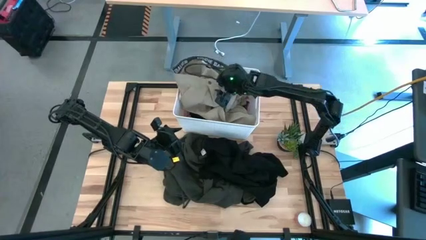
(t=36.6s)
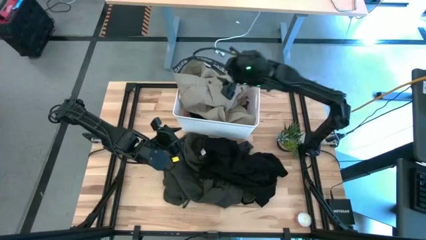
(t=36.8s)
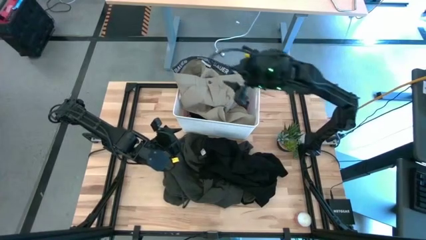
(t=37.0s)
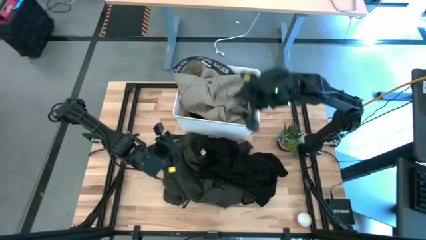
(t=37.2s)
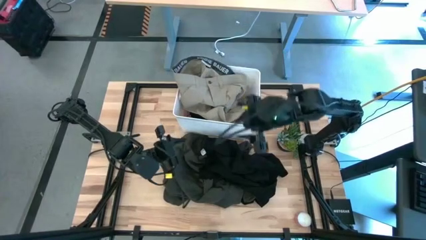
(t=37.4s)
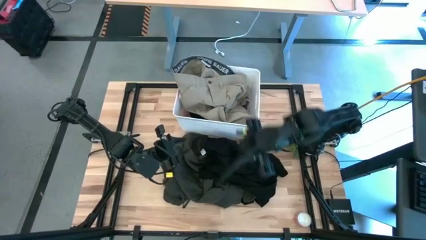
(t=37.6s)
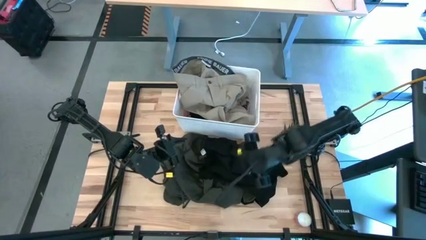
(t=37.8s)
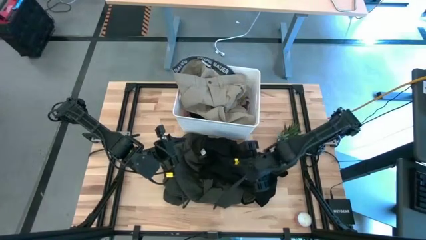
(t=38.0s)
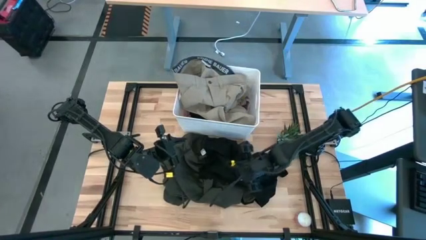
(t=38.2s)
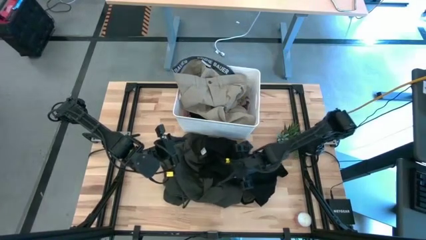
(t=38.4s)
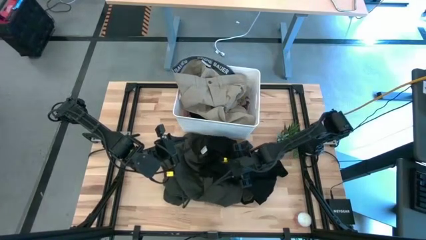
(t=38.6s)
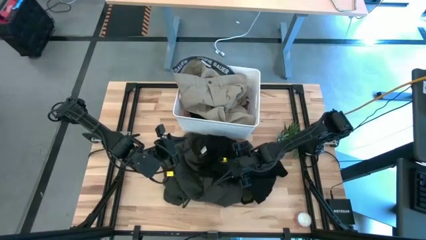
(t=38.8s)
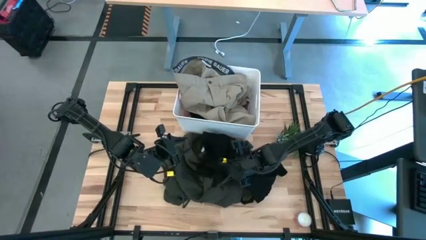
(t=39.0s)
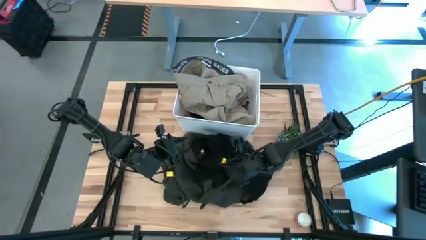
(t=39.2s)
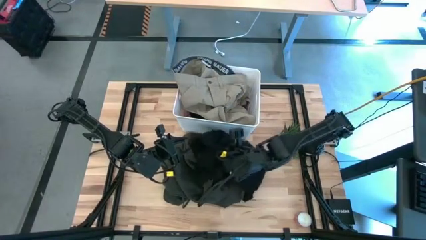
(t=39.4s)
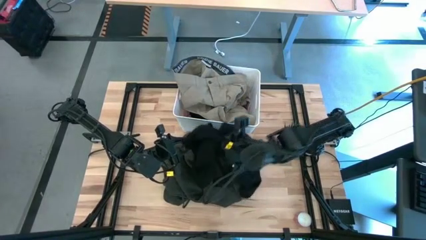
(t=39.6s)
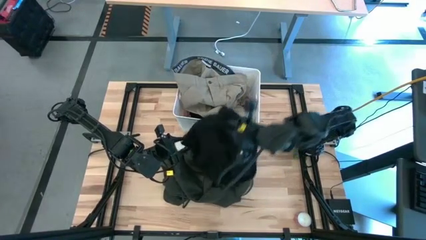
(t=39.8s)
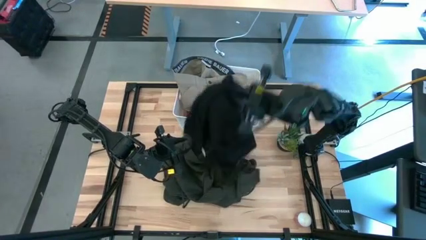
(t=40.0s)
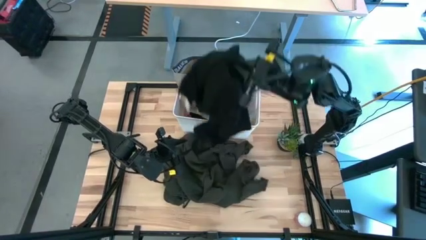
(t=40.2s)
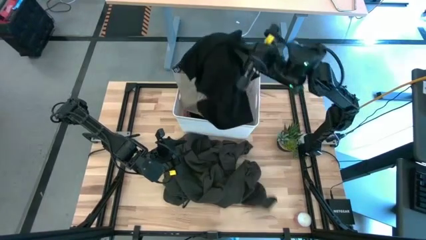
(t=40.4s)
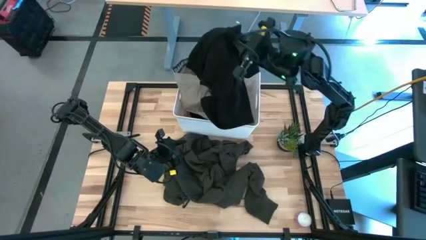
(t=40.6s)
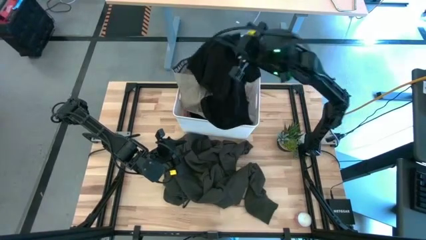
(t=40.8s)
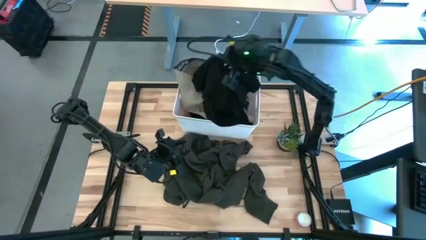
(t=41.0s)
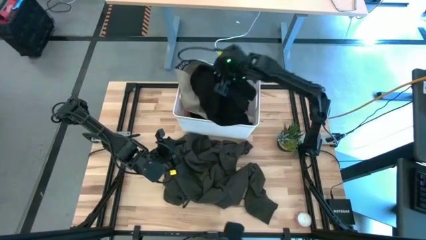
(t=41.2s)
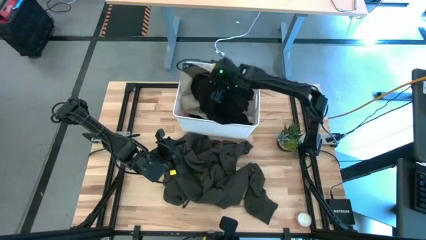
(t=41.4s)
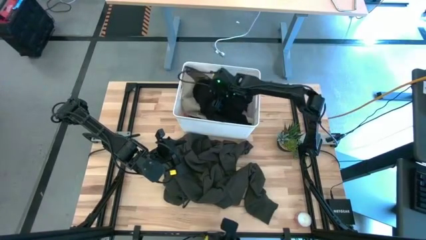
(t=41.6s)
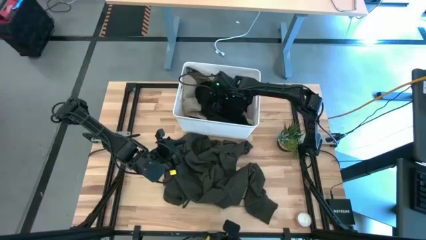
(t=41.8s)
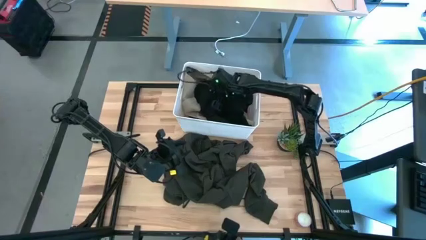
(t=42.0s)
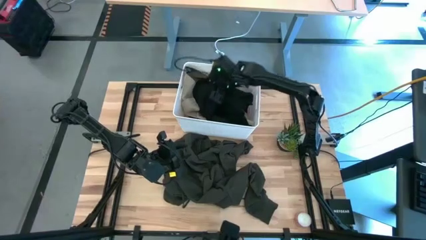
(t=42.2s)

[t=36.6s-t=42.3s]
Task: Sort clothes
Put the black shirt into the white laundry laundry bin

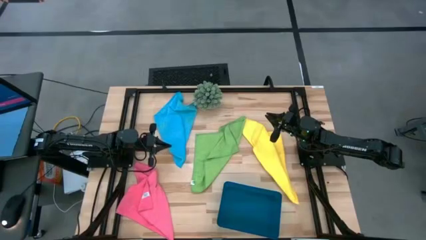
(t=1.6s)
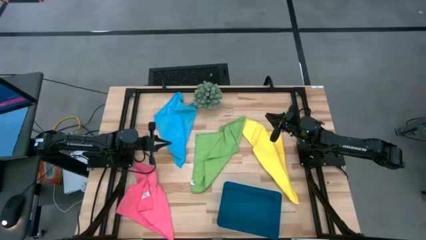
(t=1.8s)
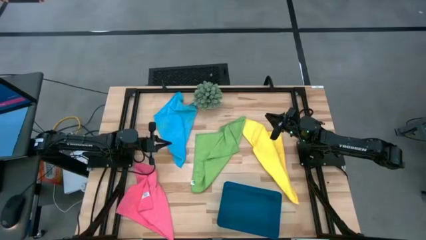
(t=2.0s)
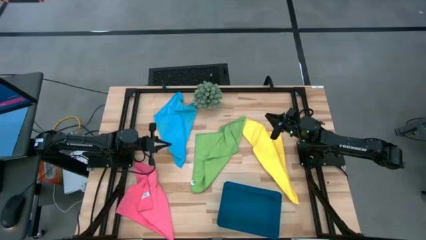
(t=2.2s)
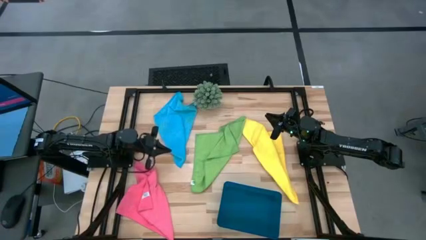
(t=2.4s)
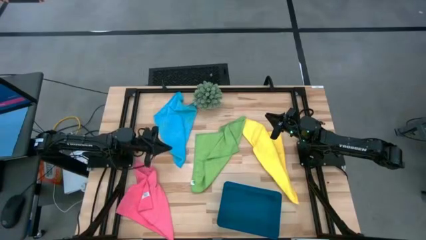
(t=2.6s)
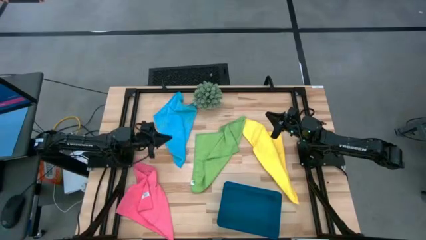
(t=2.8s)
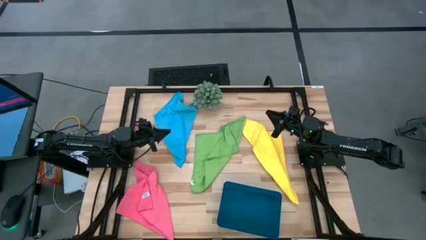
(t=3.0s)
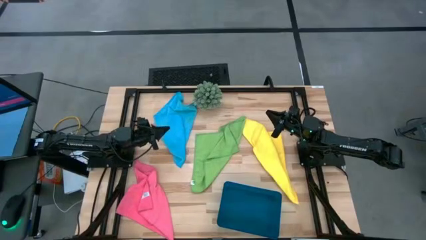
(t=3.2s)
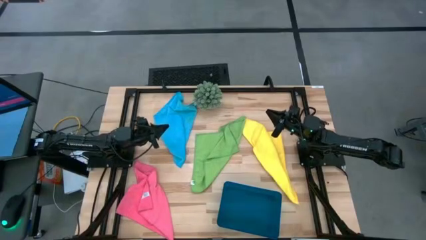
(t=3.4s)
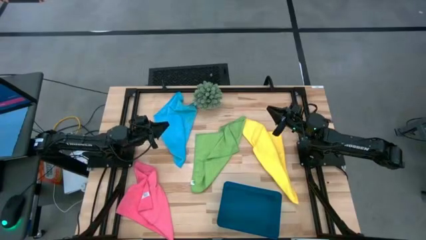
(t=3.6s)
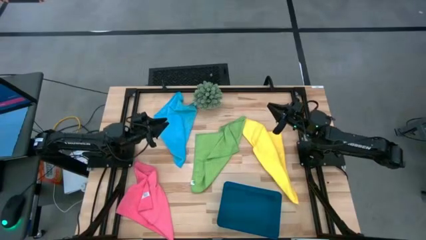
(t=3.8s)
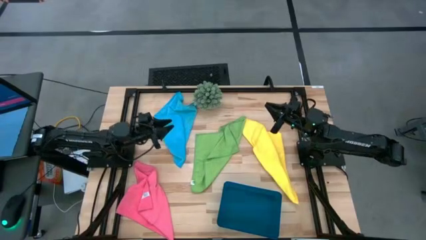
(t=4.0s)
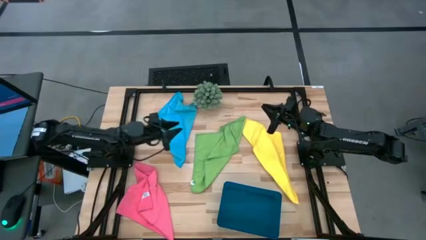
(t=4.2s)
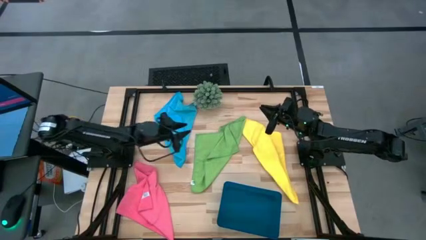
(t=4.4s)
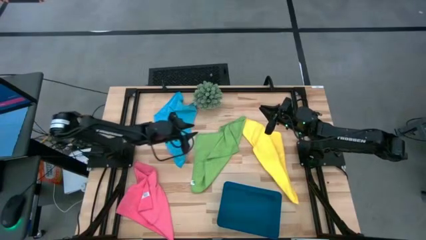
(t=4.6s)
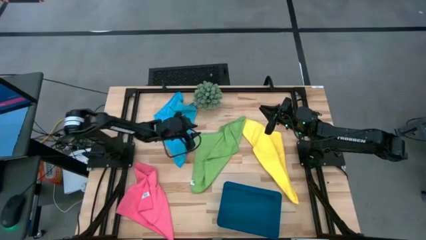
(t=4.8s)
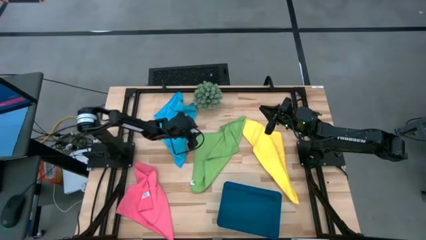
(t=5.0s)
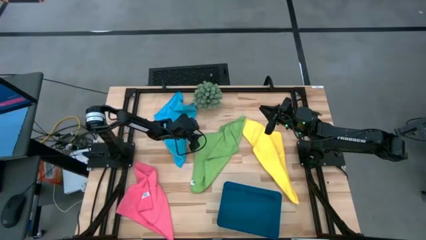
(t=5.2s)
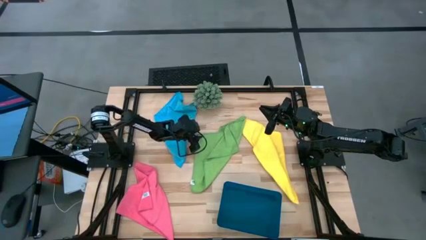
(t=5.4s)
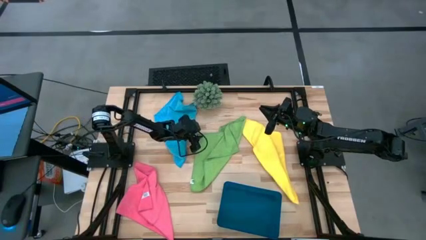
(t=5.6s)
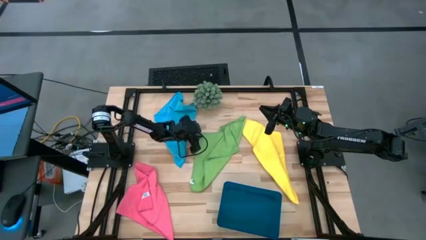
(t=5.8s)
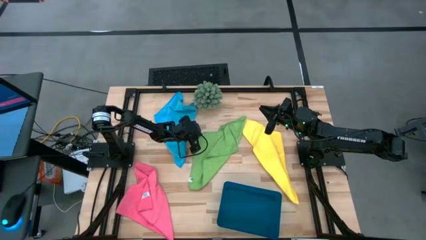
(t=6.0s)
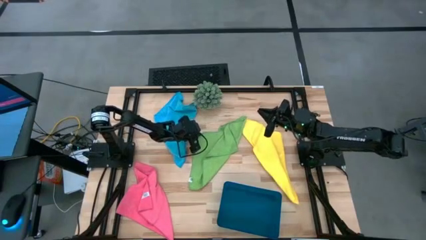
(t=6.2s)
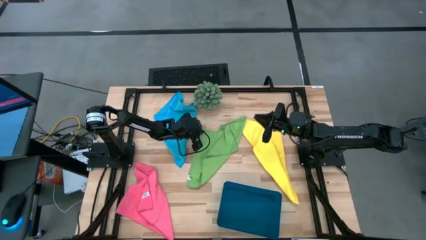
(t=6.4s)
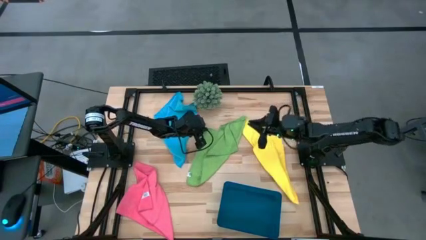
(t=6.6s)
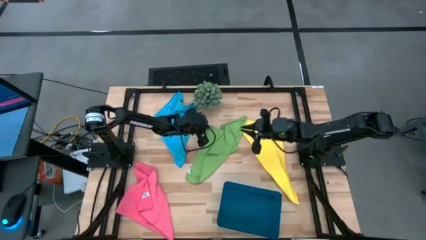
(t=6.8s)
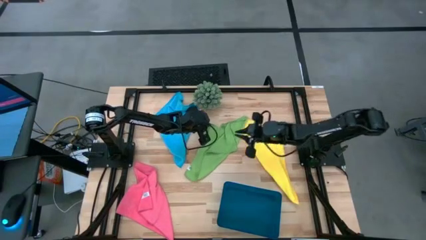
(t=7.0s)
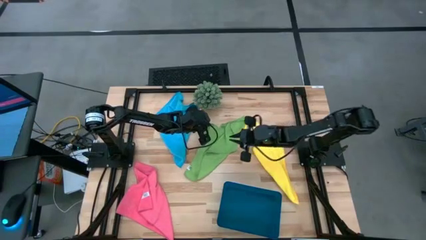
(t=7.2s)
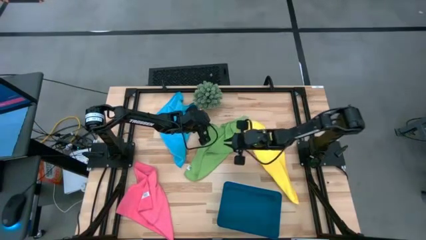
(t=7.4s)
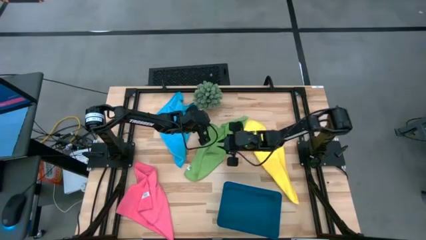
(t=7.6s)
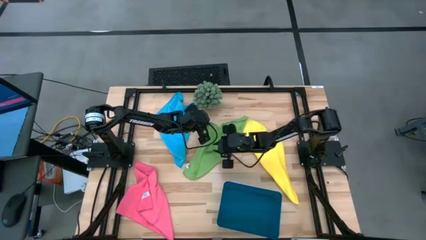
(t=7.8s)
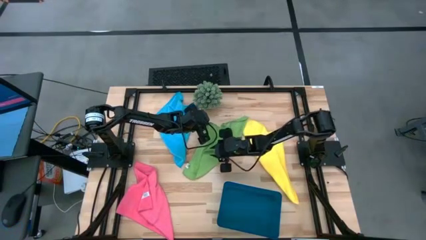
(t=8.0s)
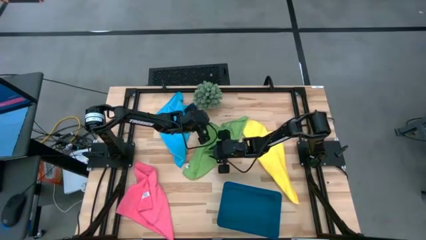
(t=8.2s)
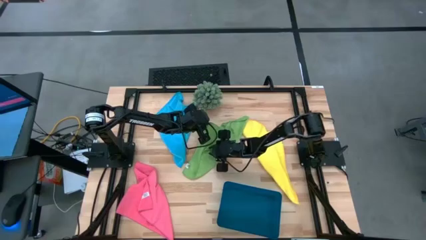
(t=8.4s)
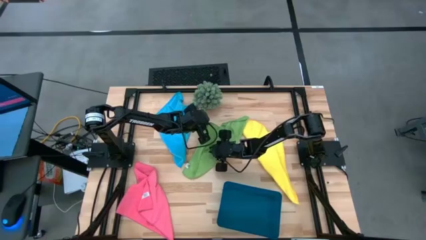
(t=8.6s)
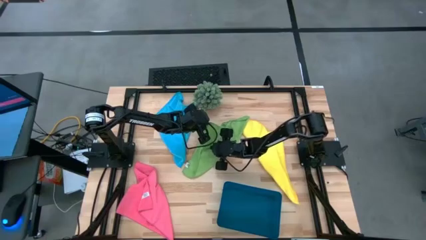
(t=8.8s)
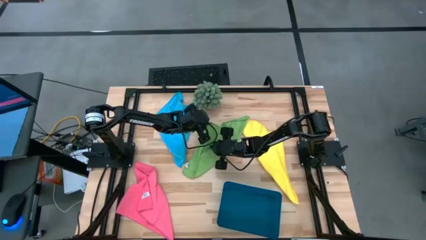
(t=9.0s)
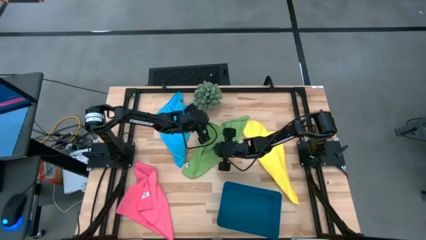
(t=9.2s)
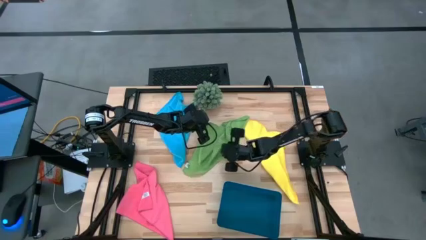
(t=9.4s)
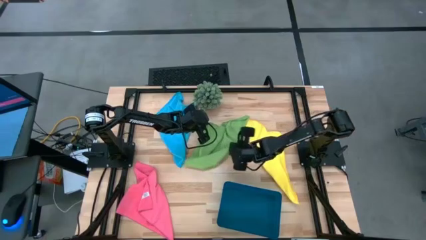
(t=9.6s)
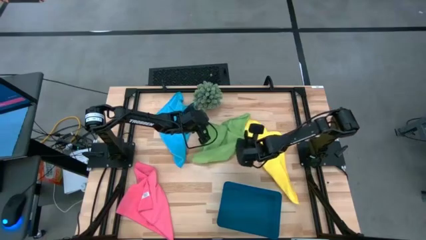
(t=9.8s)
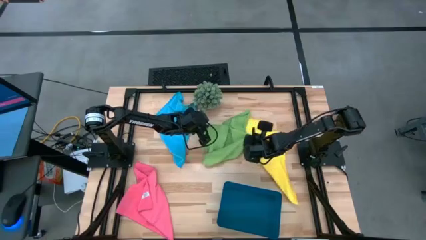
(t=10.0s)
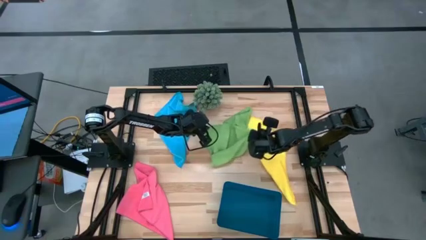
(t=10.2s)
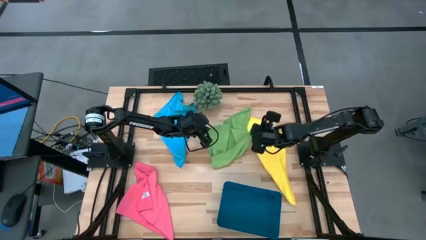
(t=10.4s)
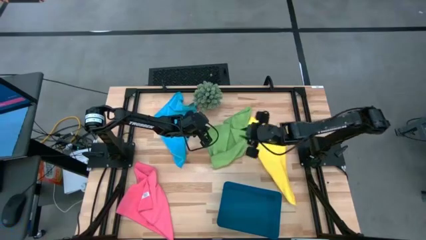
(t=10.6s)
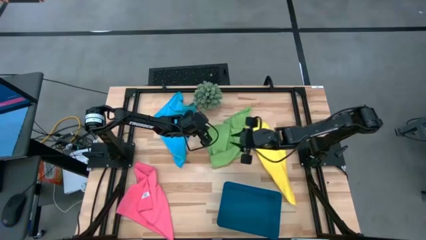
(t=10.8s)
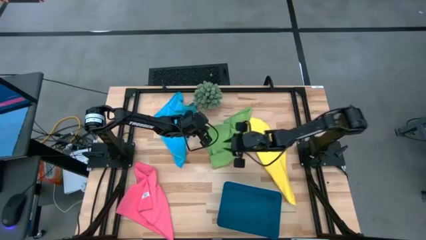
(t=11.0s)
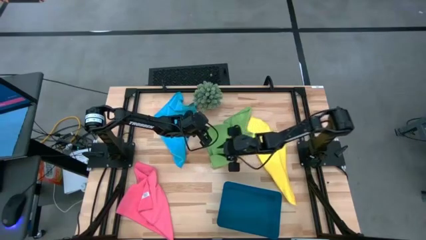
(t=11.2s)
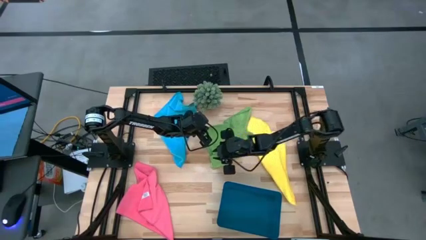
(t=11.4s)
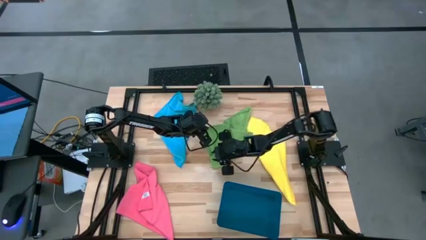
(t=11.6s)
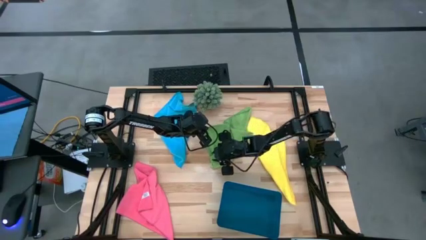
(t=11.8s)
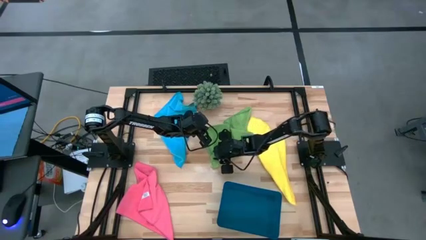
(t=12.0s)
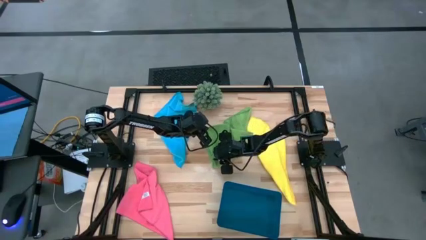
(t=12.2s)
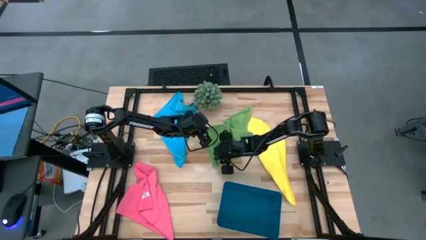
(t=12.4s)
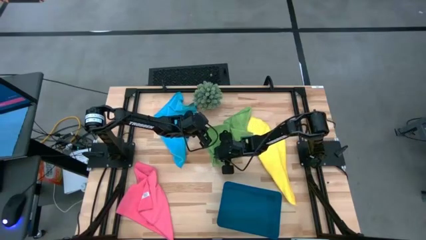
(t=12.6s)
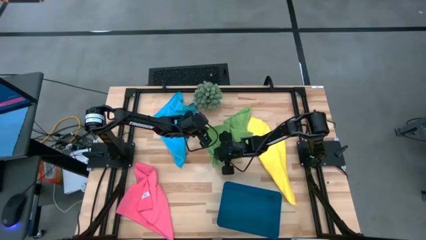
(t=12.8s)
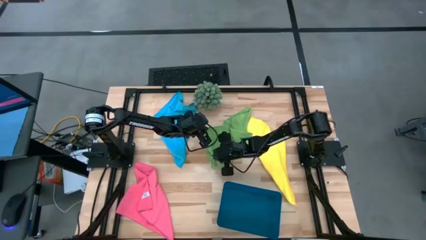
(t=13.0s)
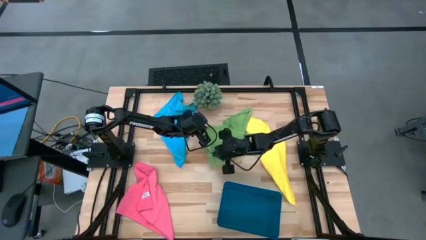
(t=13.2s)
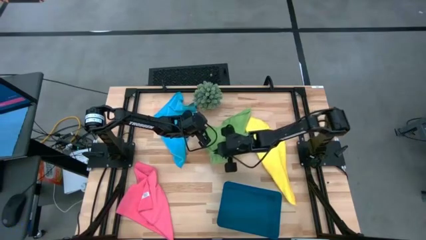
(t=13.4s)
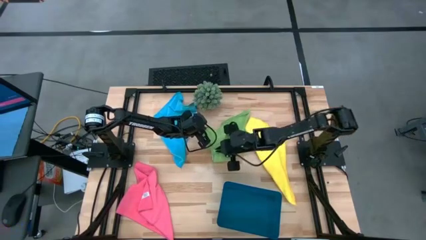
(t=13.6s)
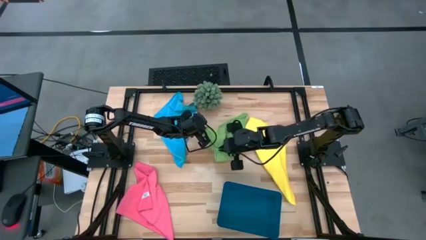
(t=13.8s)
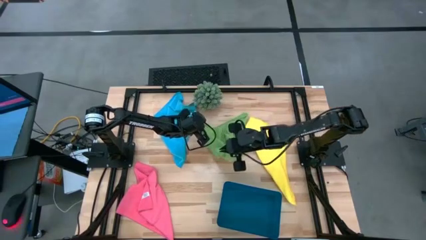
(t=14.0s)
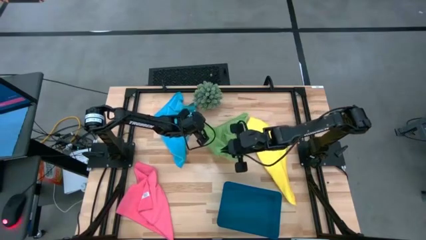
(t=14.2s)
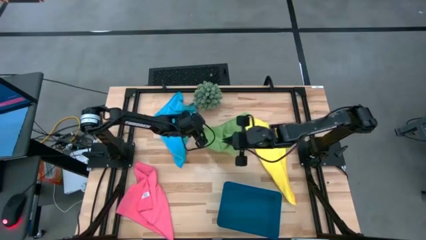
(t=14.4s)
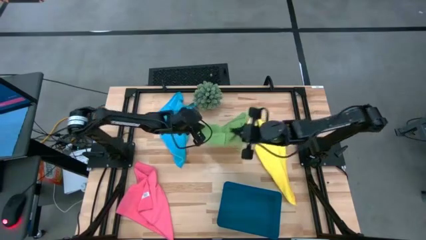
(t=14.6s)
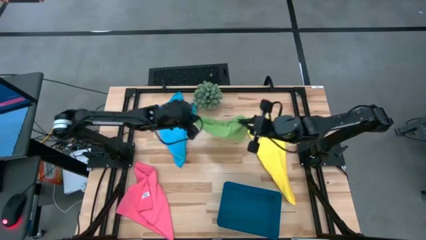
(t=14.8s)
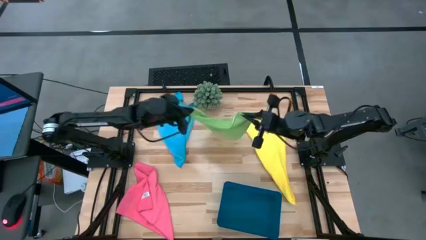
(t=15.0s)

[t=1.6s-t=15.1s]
Task: Fold microfiber towels
Fold the green microfiber cloth
